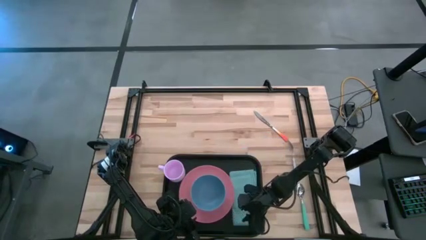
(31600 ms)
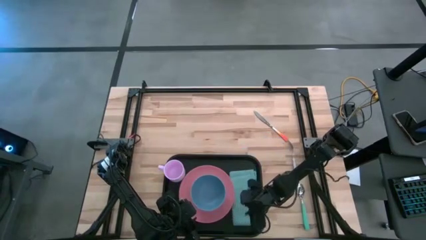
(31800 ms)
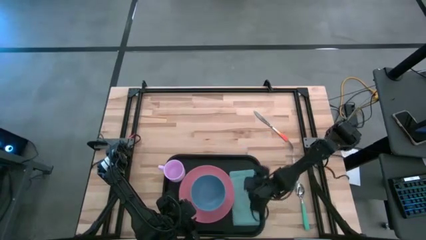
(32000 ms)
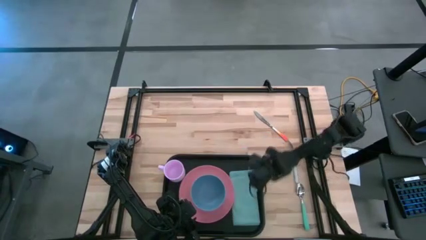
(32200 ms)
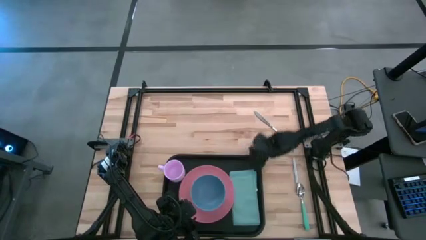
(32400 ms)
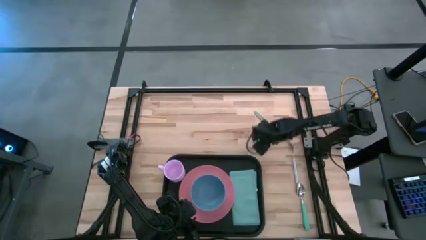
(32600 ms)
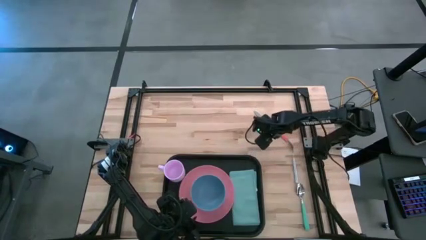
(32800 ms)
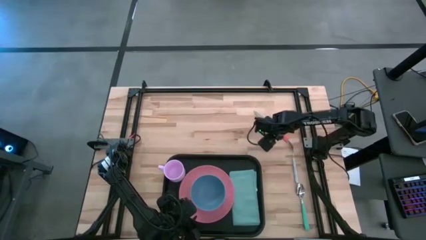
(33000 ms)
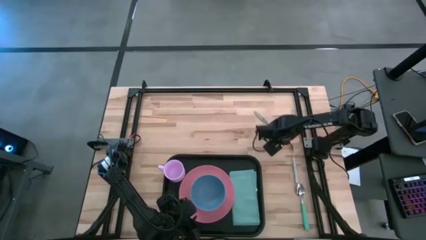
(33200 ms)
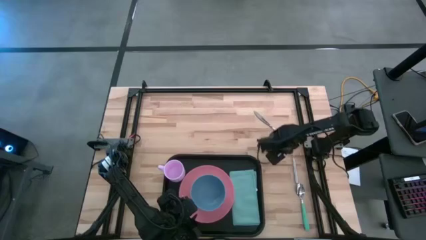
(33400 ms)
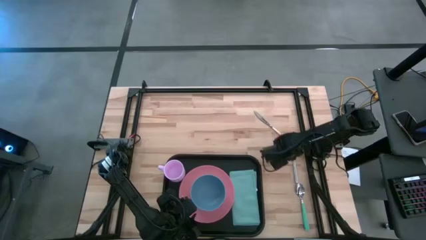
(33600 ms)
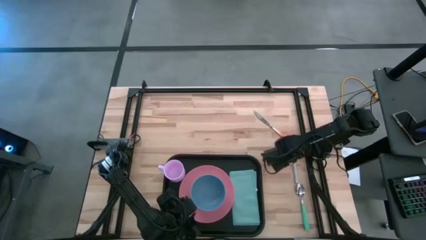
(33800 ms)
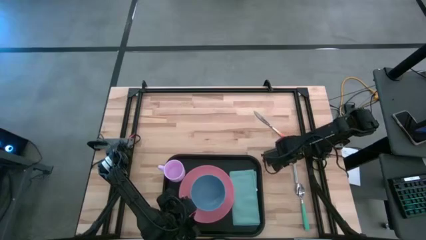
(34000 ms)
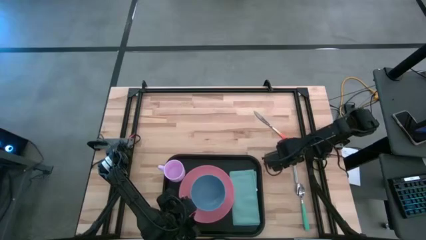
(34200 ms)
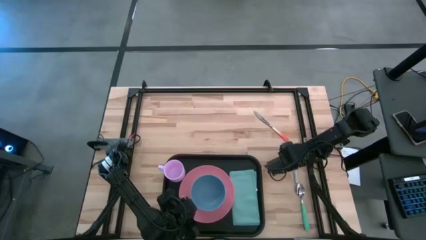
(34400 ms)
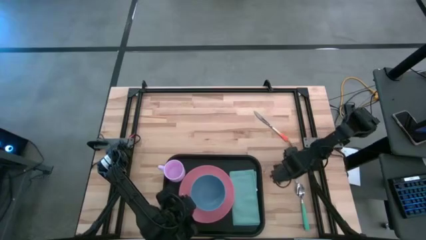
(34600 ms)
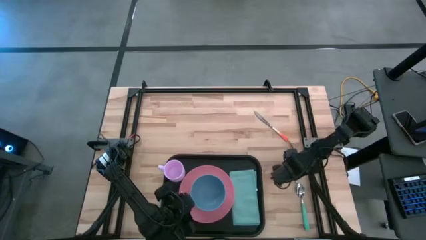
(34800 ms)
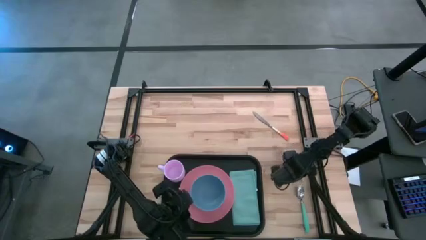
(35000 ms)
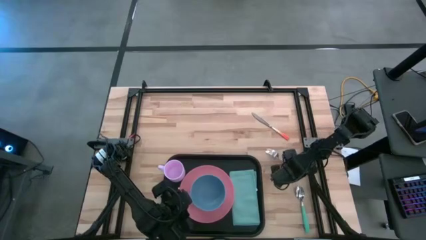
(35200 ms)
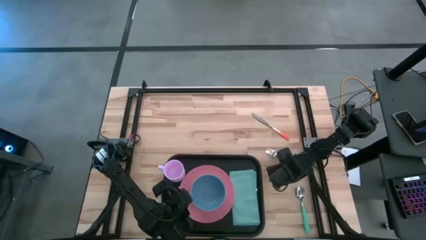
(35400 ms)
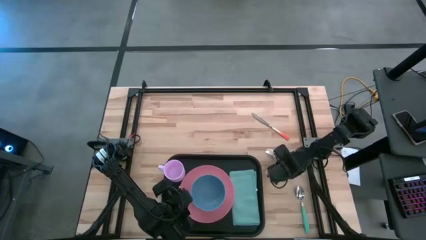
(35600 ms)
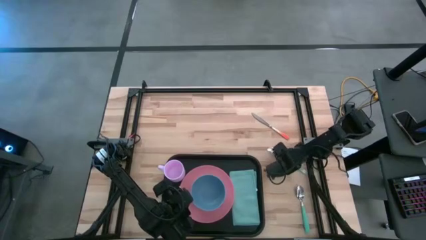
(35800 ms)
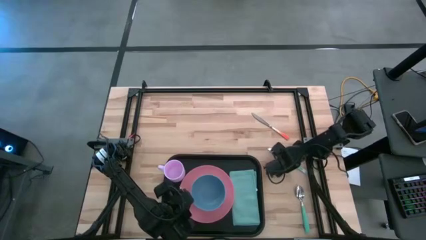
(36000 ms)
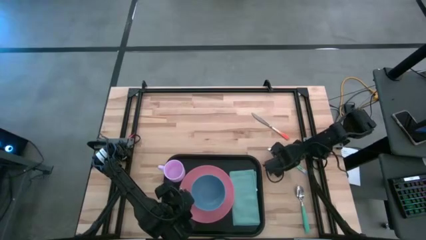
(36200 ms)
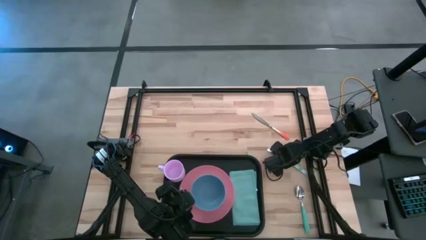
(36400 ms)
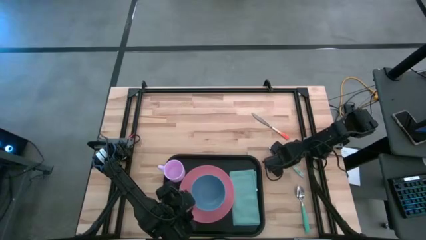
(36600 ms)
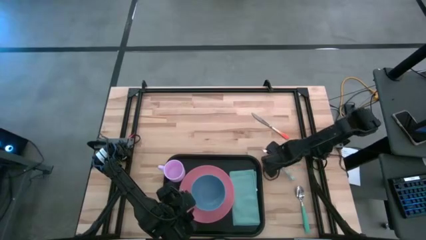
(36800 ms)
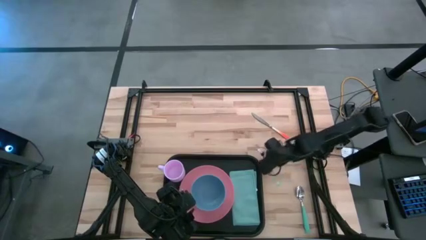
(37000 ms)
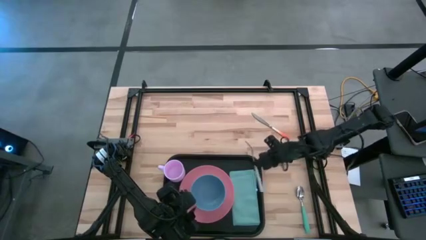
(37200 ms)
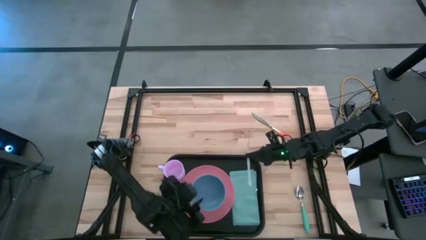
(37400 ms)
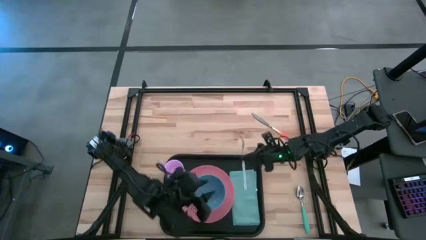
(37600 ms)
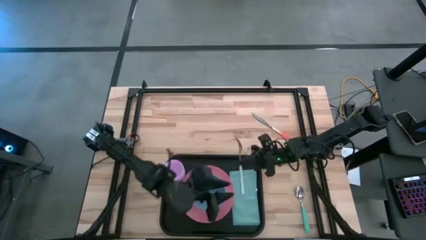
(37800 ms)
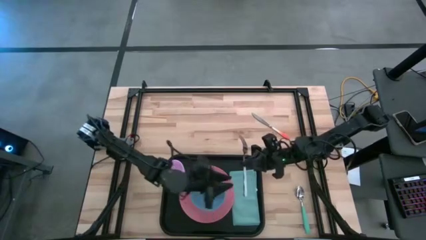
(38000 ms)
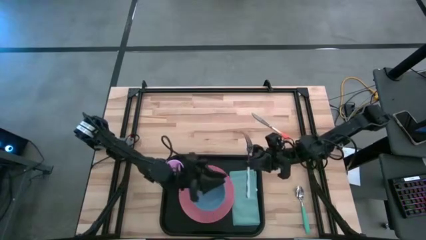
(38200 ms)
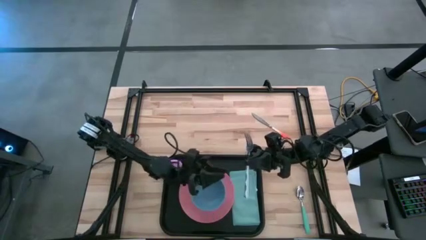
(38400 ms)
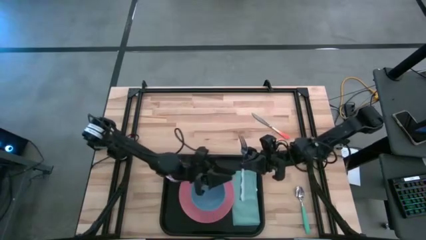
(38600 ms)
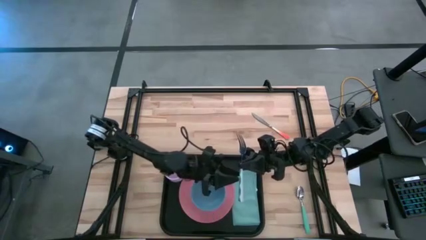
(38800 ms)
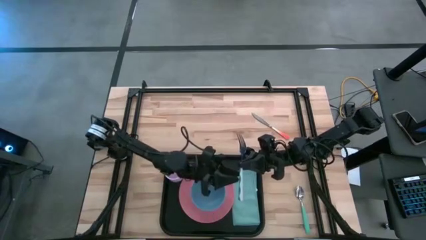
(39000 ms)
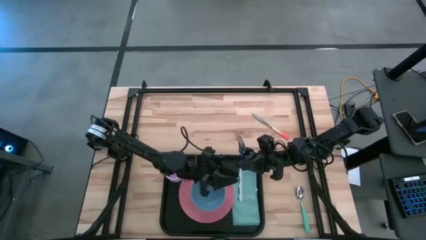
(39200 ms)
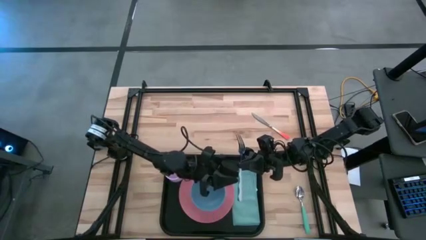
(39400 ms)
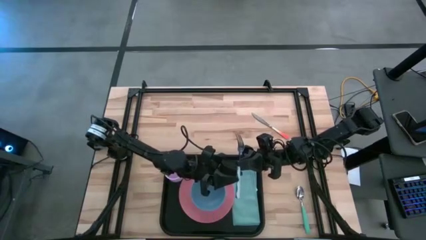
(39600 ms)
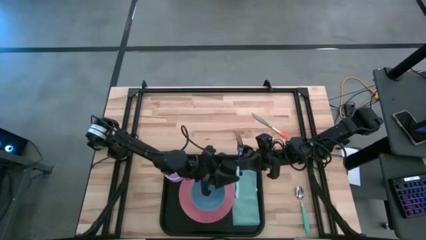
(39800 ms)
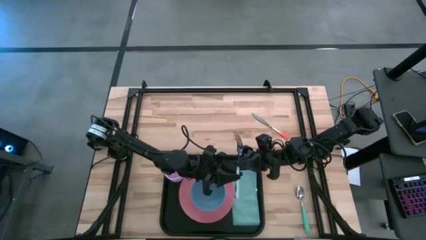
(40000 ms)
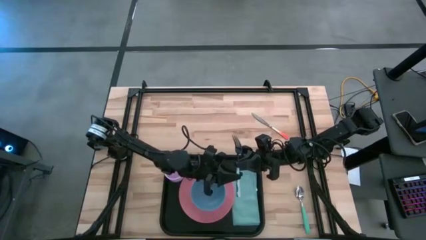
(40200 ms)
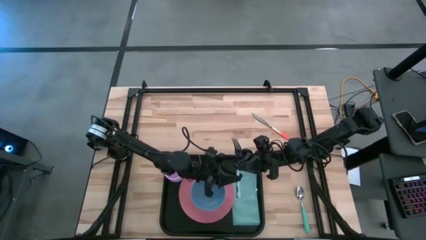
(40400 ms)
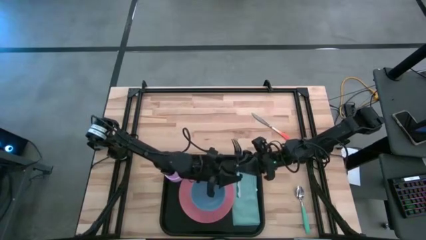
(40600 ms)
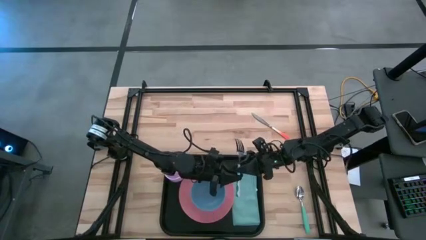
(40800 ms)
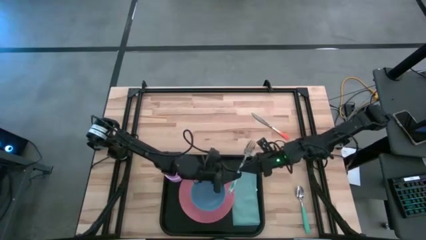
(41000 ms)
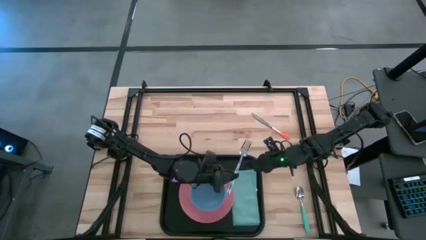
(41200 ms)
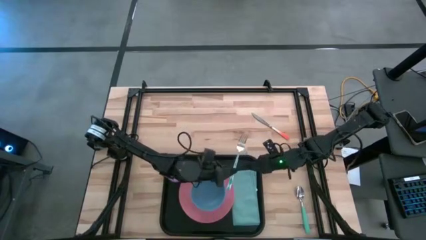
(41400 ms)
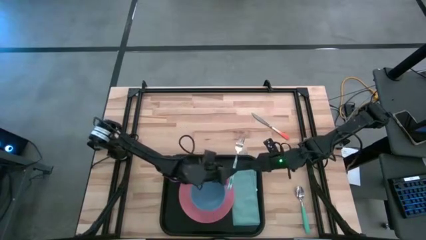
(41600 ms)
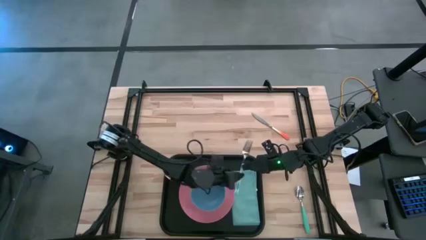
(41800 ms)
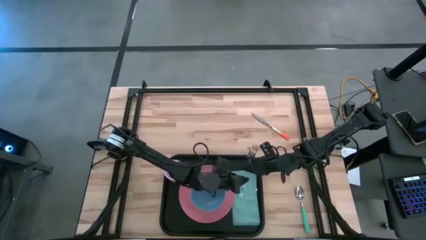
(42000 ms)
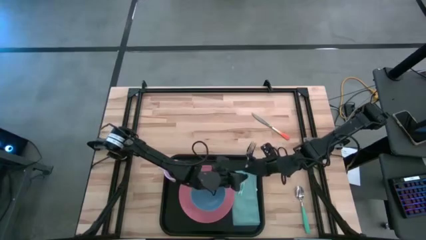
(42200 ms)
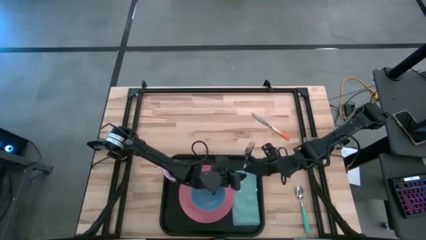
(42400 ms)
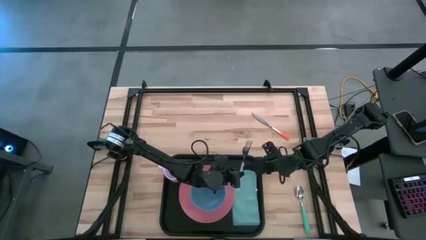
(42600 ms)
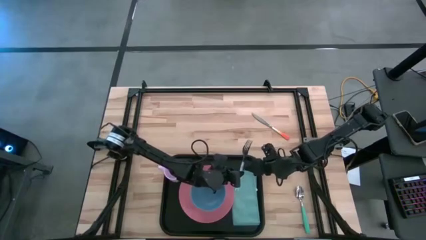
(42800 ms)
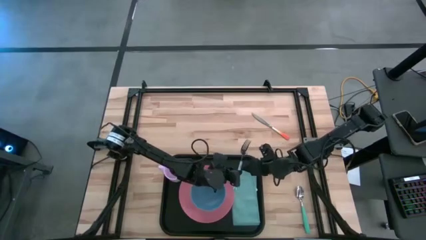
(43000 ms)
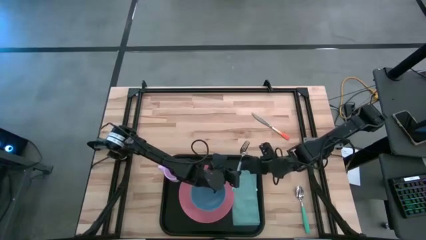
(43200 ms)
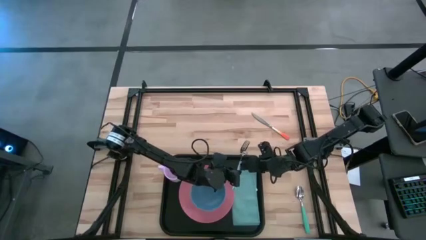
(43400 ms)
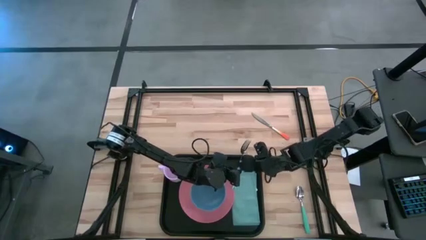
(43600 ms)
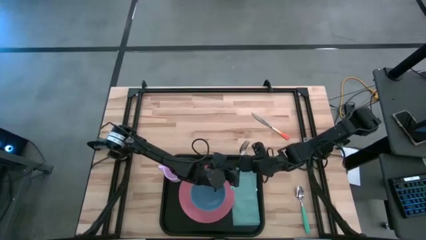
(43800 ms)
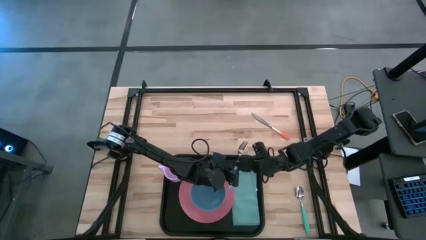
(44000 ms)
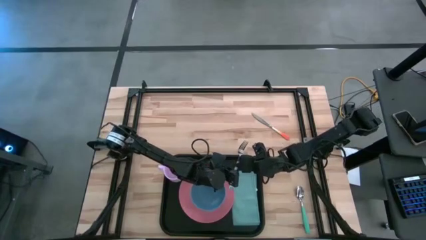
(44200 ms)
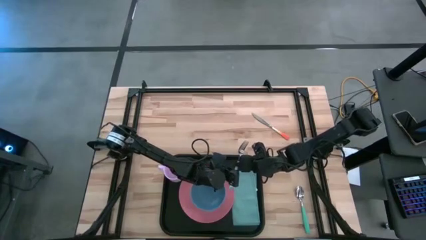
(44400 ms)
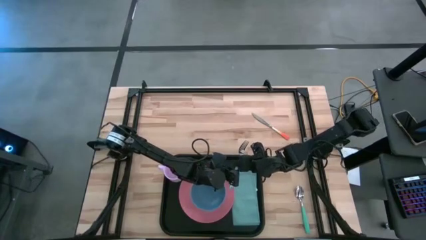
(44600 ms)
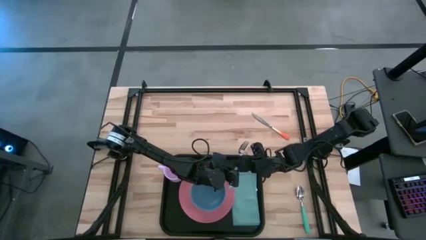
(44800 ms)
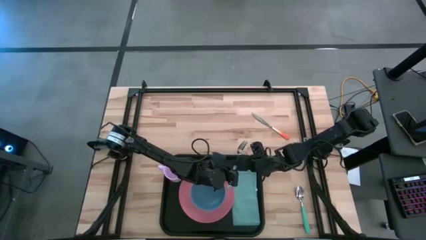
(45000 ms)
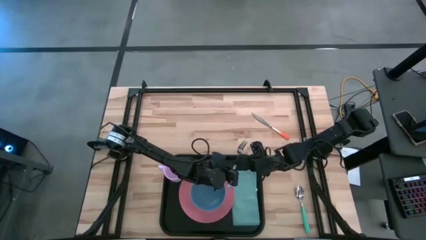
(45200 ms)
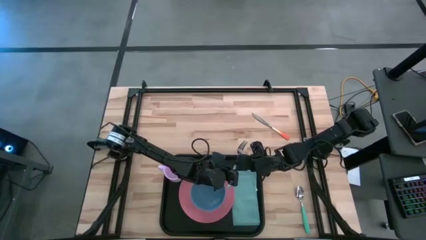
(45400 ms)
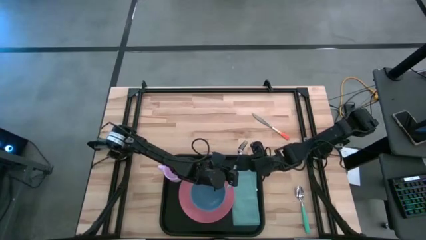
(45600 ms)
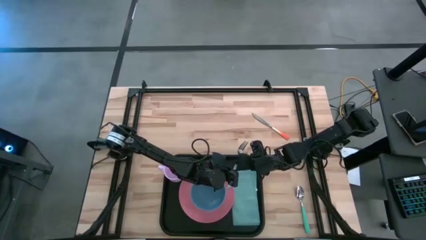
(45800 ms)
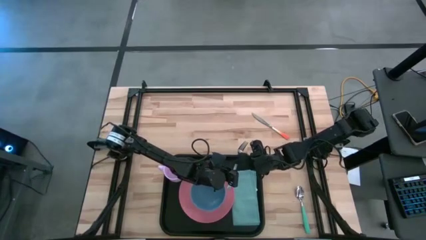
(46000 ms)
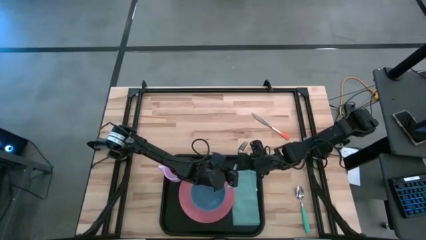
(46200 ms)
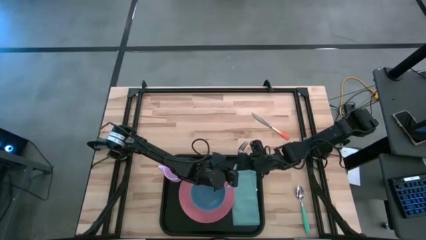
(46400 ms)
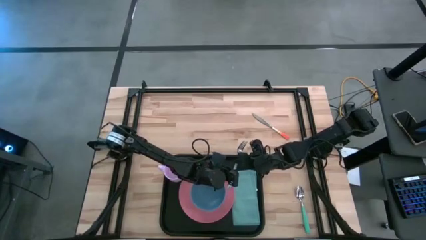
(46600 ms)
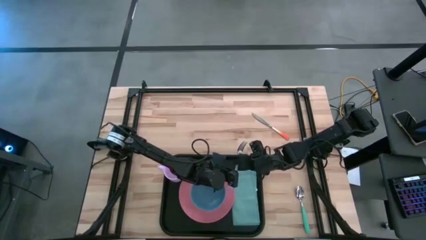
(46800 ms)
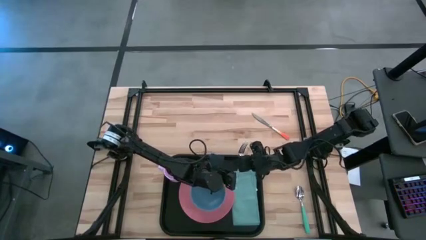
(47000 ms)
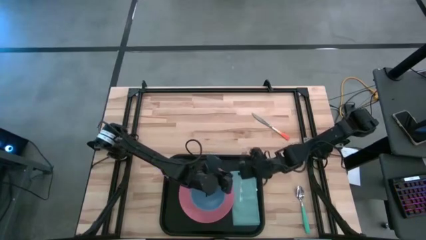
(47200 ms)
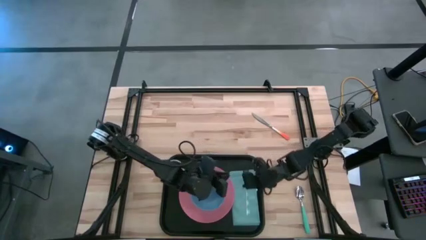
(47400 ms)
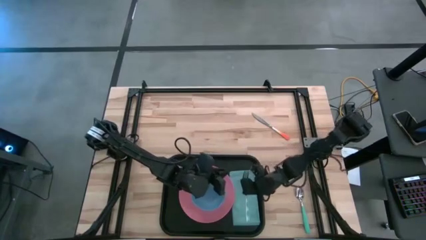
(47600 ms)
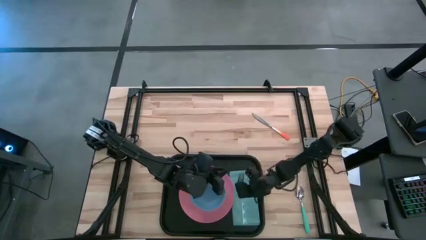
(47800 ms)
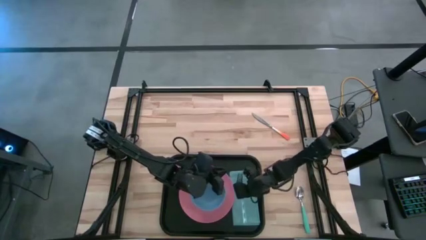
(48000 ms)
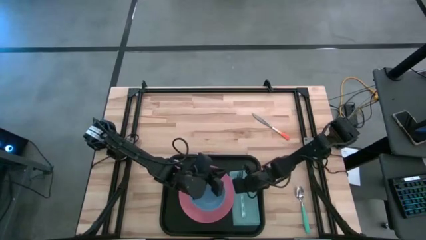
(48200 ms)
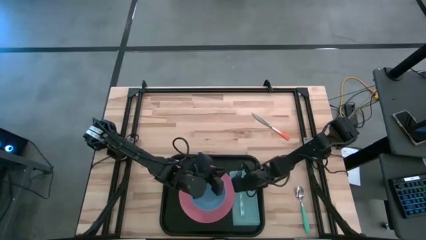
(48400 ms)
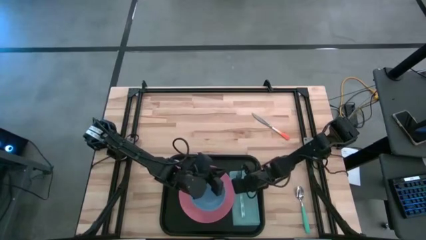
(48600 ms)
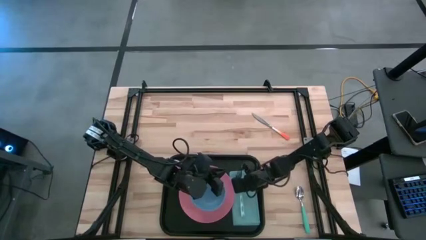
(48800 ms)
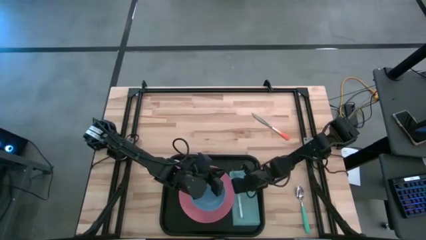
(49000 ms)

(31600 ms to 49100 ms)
Task: Set up tray
Put the fork on top of the napkin
